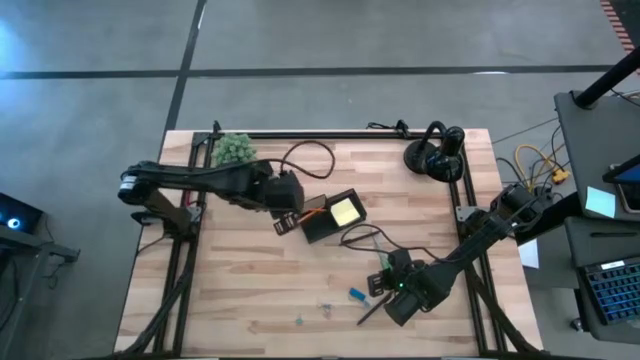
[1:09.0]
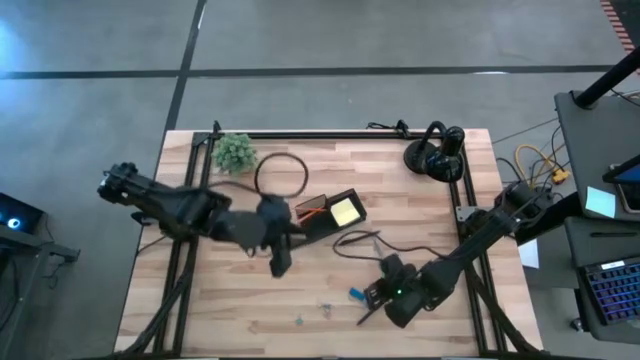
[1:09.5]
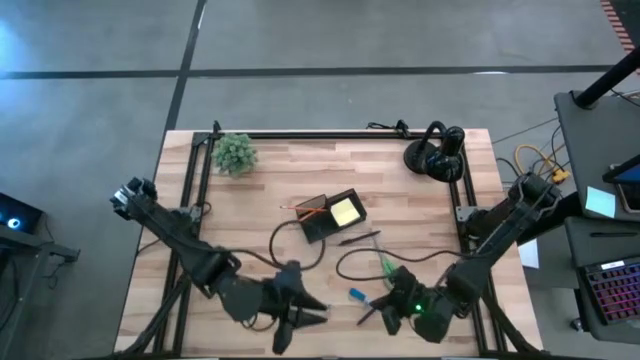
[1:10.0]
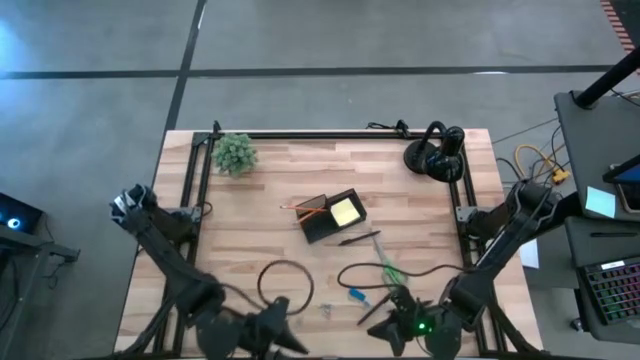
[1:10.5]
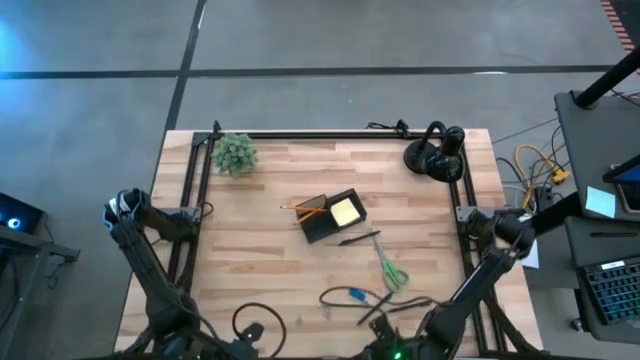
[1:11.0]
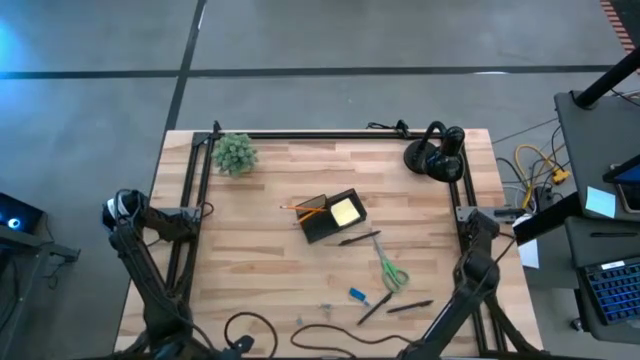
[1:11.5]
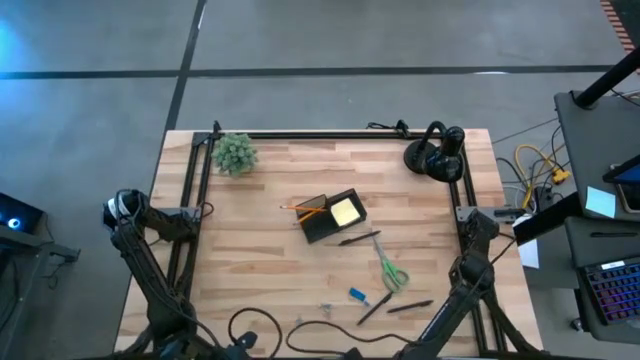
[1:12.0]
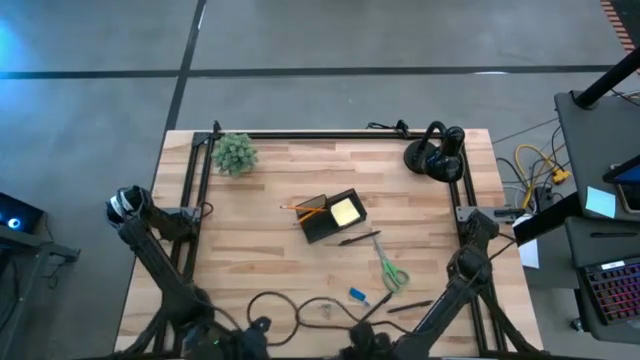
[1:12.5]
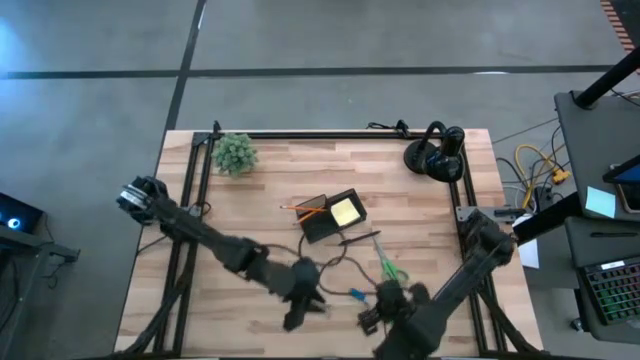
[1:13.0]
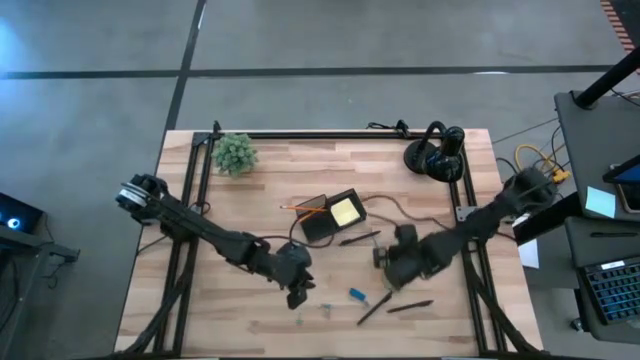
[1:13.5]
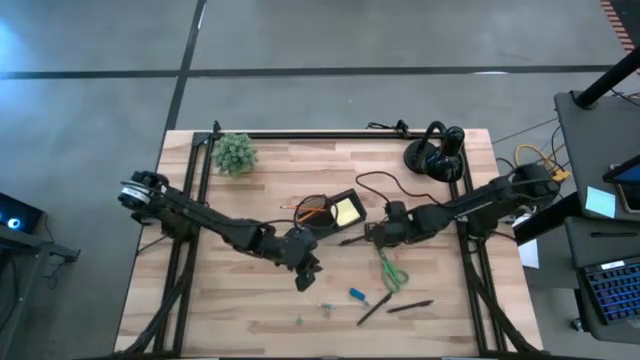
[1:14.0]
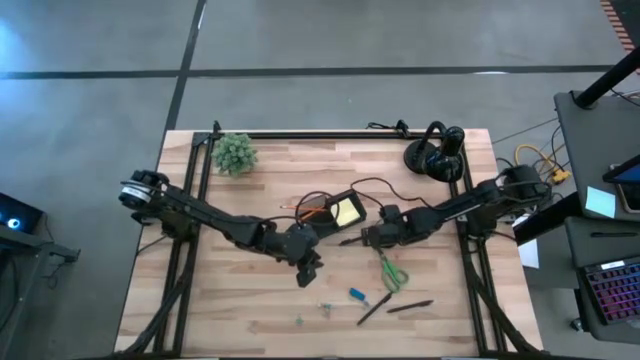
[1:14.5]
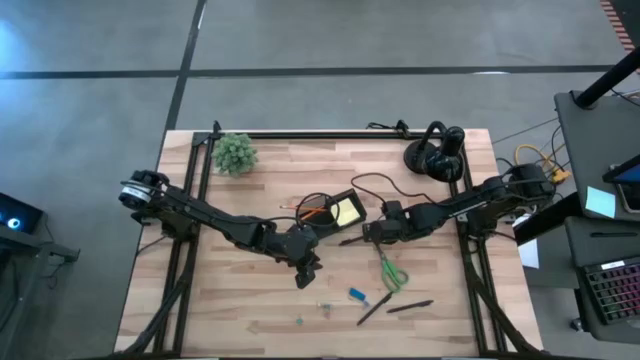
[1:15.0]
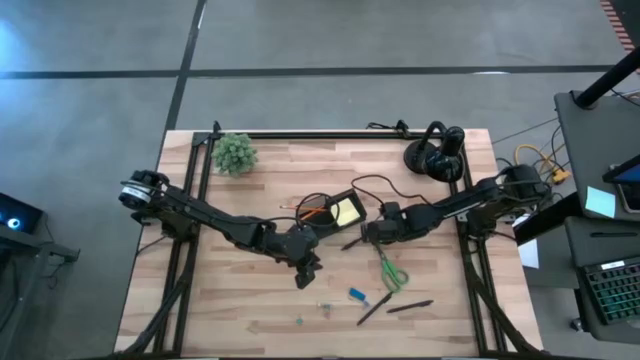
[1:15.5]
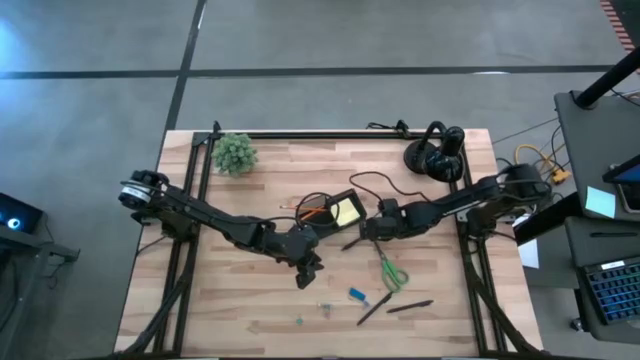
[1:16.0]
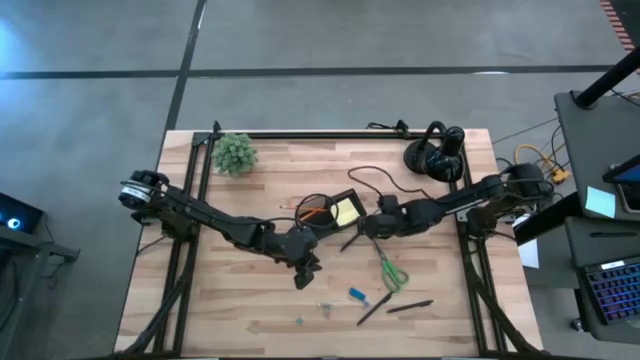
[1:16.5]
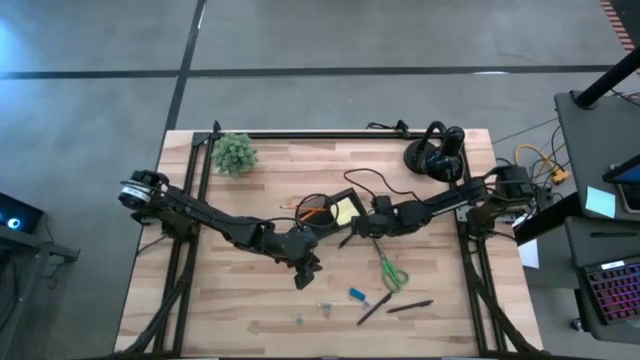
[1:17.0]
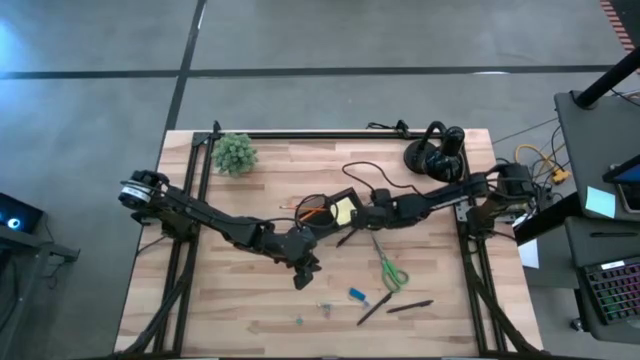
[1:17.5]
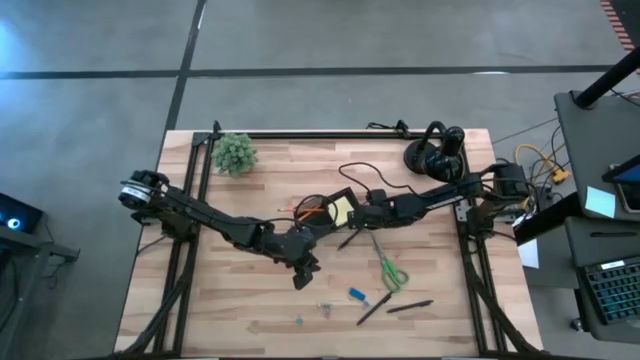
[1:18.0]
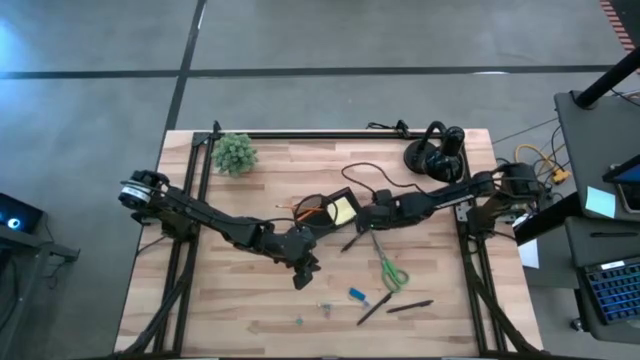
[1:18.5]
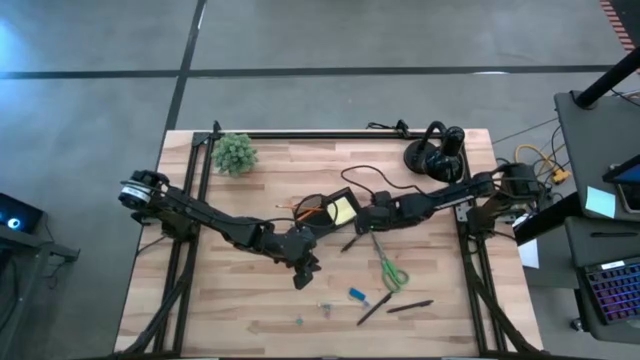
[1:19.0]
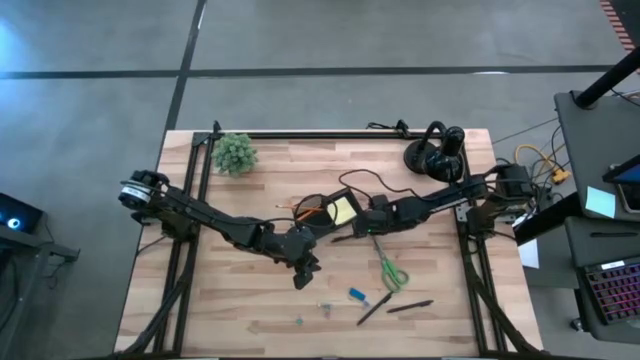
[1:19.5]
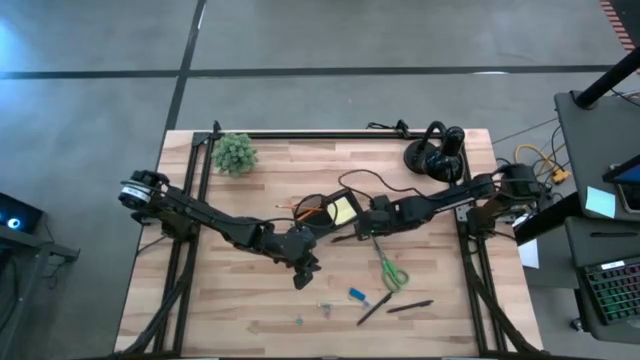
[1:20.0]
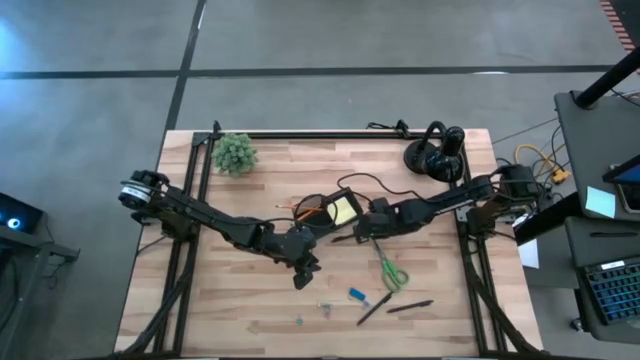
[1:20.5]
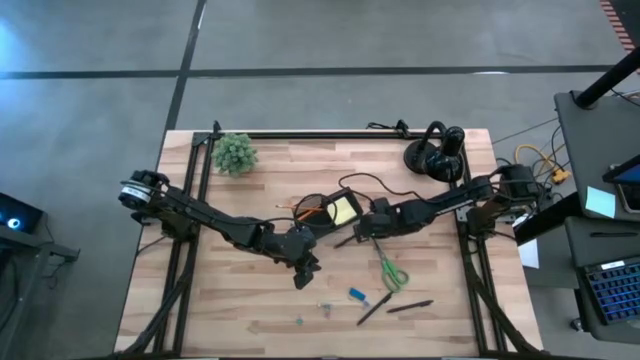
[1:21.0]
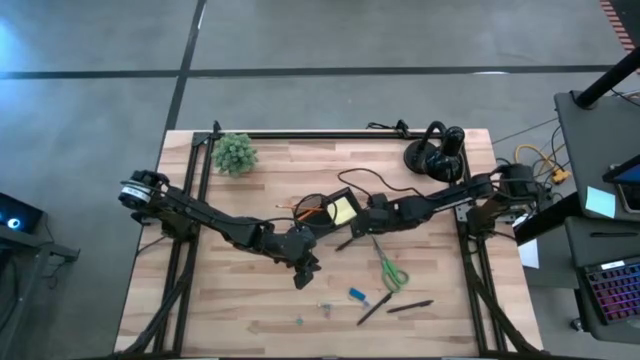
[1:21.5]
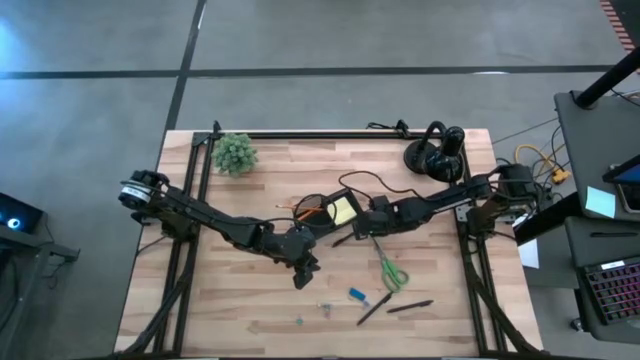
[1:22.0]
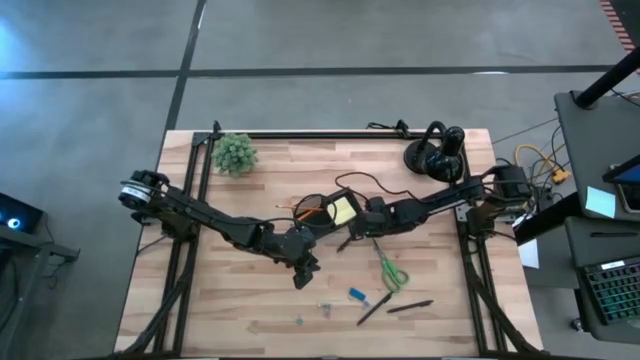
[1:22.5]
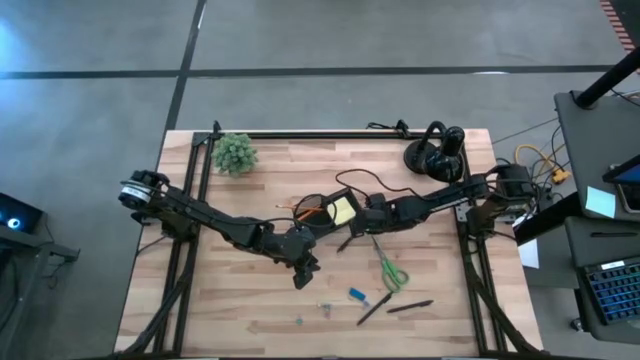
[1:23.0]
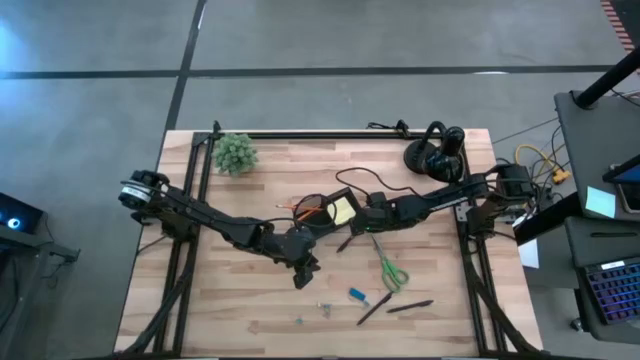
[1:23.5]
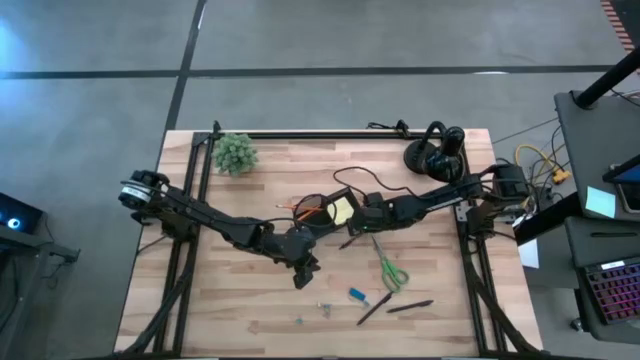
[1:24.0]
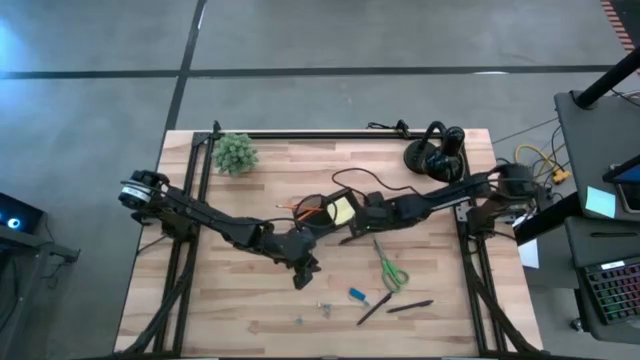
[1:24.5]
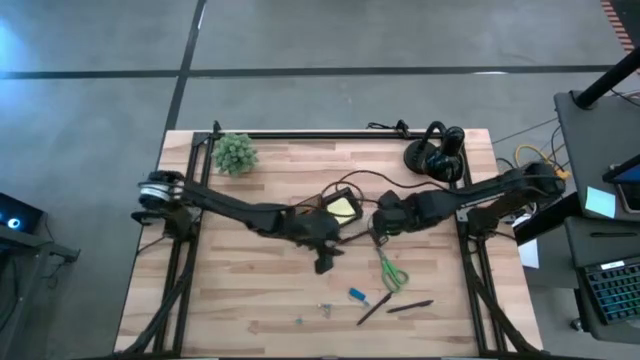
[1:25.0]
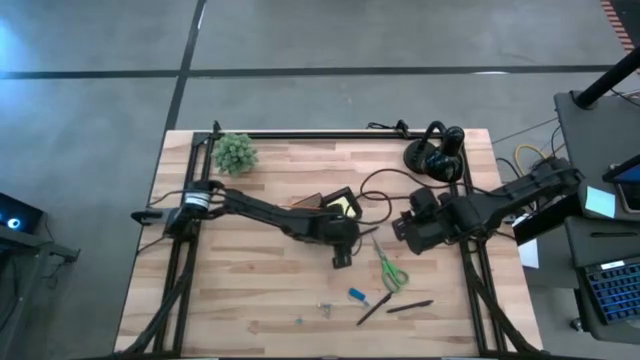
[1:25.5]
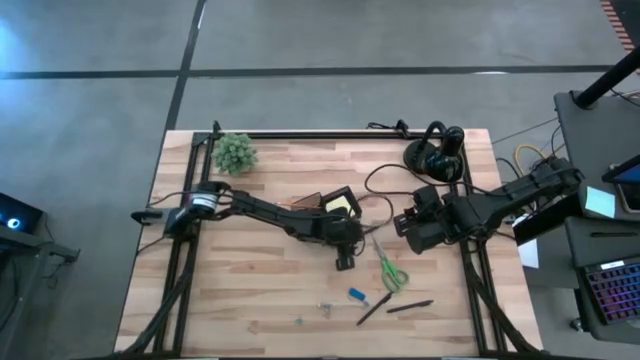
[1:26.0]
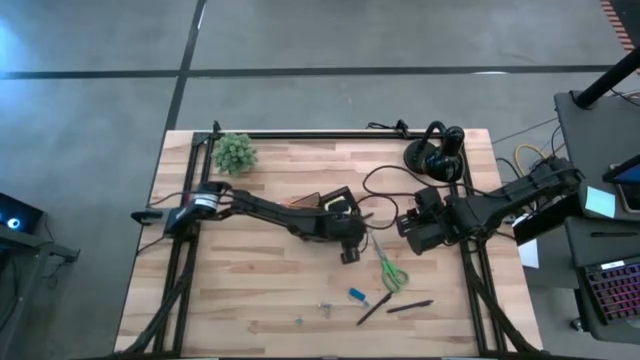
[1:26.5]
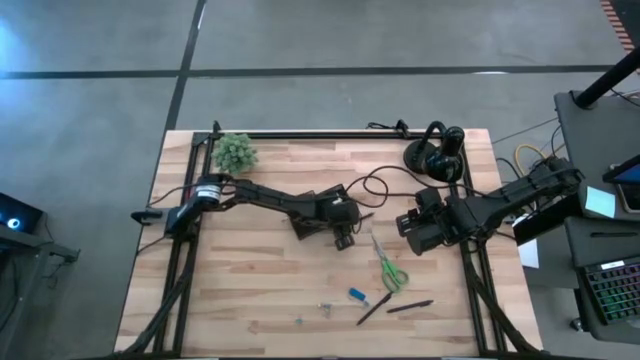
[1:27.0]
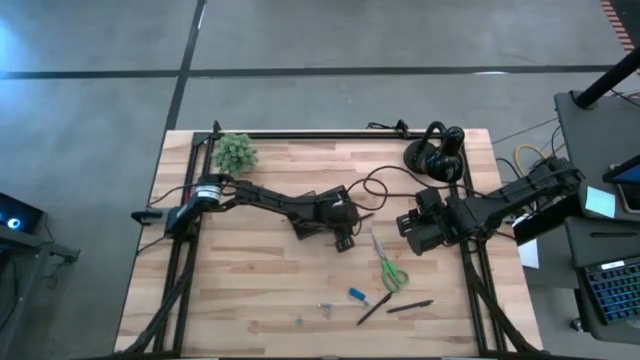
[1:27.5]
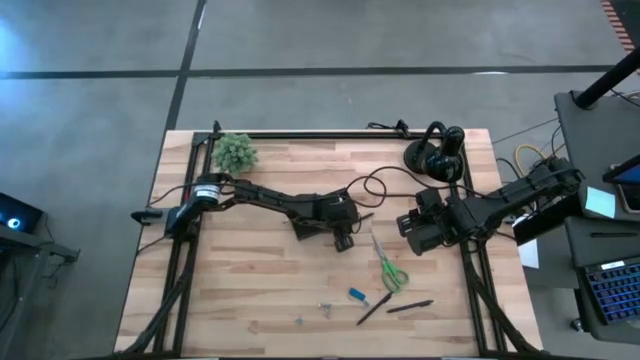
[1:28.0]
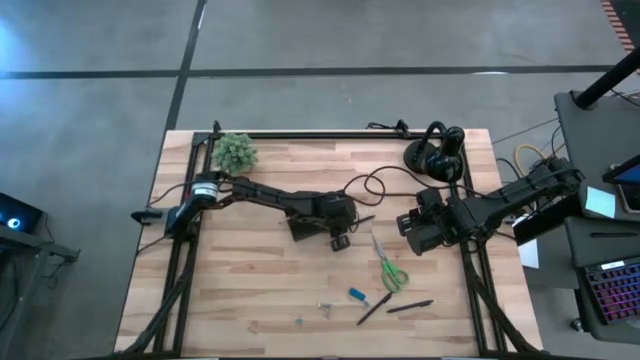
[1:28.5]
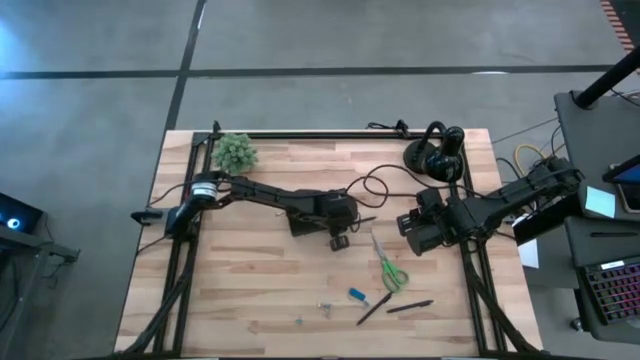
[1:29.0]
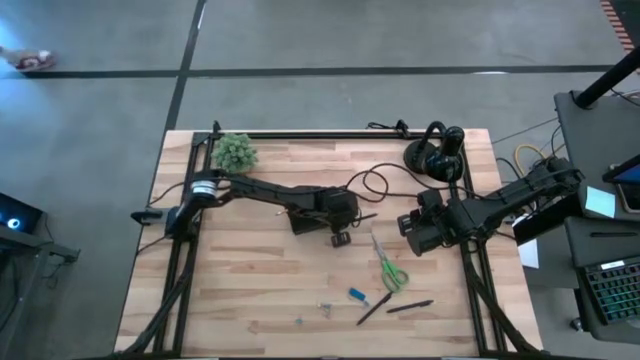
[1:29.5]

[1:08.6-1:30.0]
Task: Pick and place office supplies into organizer
Put the top black pen into the black desk organizer

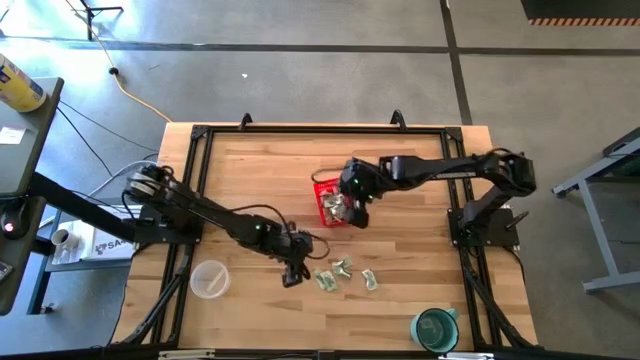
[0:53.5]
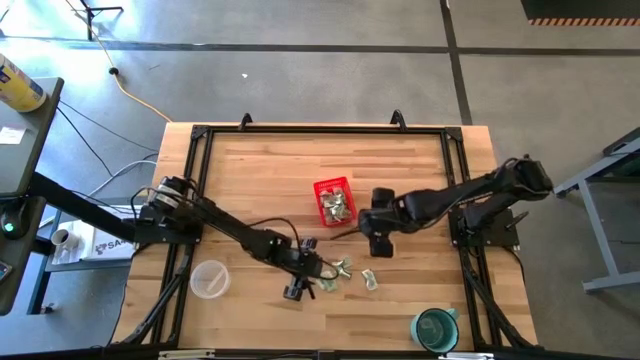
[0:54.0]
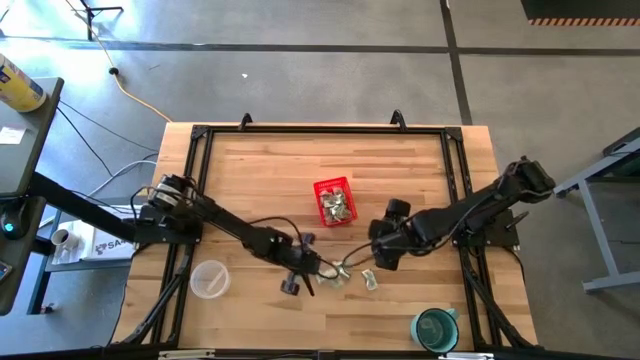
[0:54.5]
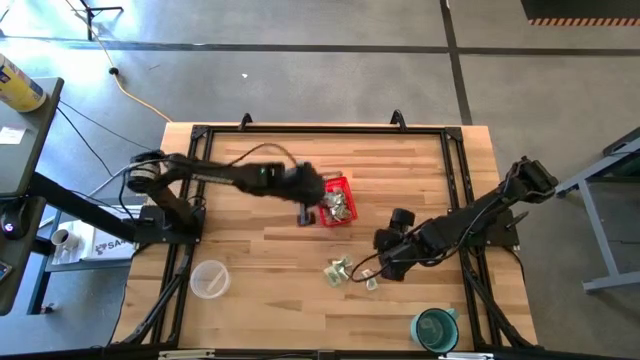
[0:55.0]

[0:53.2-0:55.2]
Task: Pick and place items into bin
Put the light green stevia packet into the red bin
